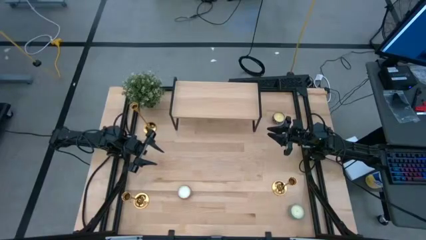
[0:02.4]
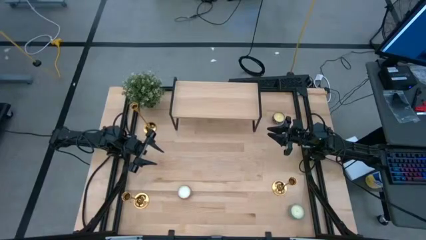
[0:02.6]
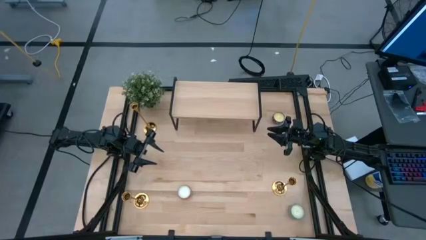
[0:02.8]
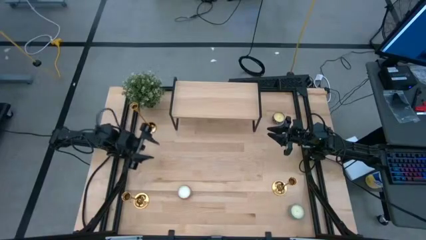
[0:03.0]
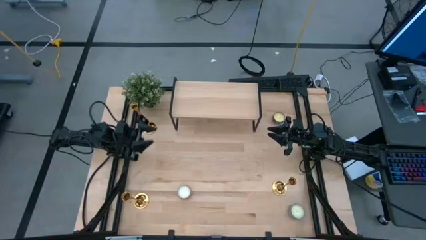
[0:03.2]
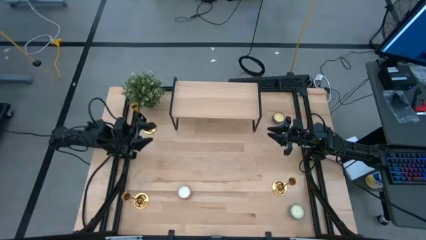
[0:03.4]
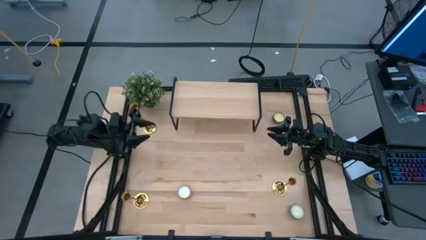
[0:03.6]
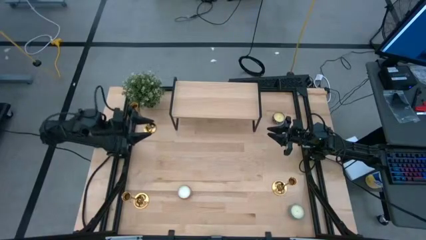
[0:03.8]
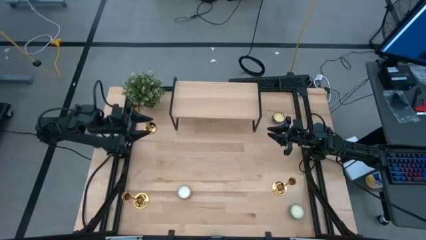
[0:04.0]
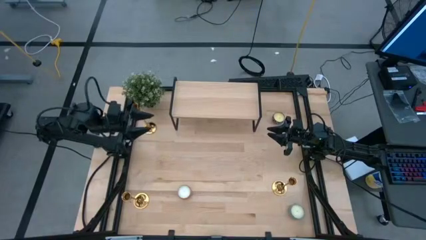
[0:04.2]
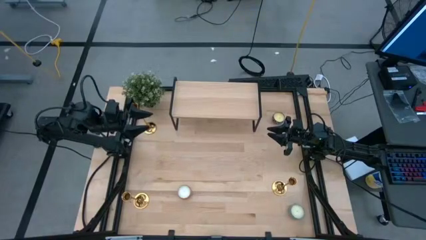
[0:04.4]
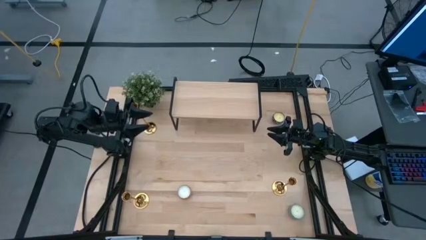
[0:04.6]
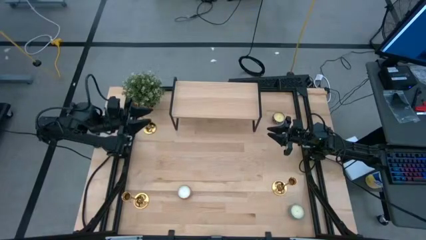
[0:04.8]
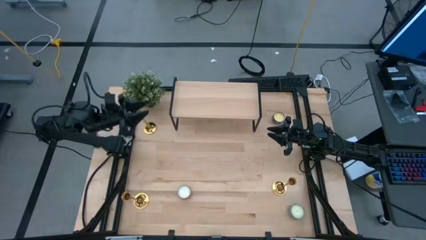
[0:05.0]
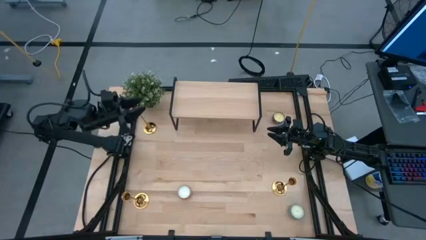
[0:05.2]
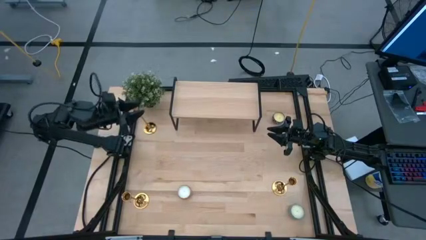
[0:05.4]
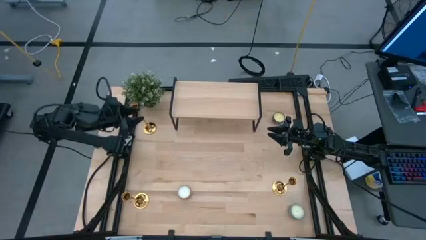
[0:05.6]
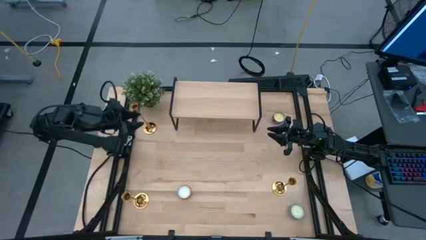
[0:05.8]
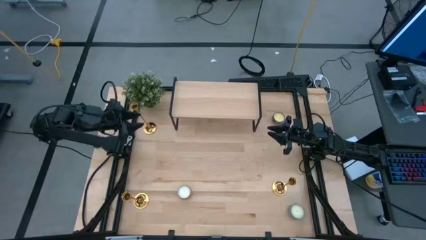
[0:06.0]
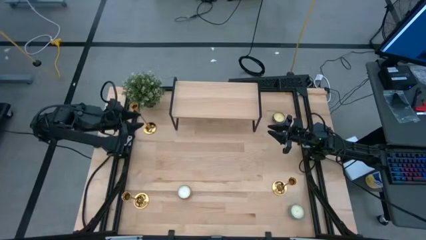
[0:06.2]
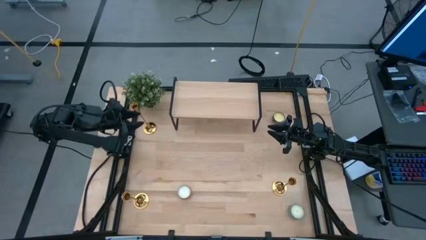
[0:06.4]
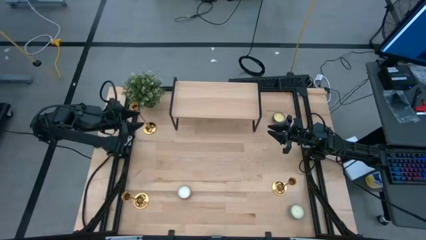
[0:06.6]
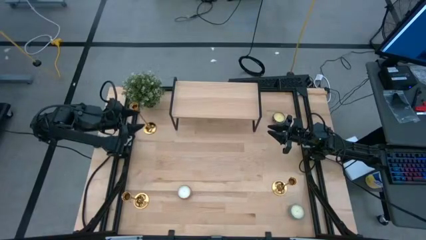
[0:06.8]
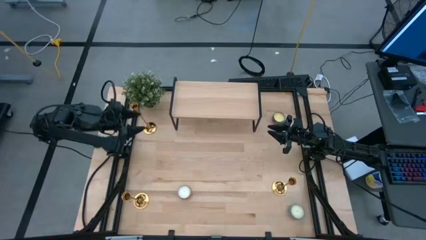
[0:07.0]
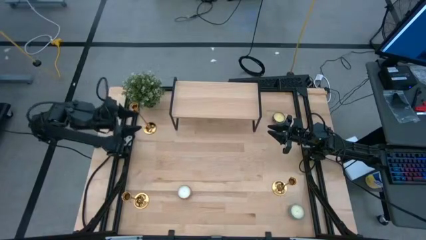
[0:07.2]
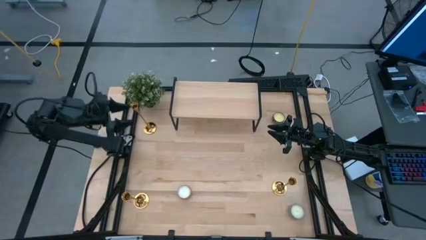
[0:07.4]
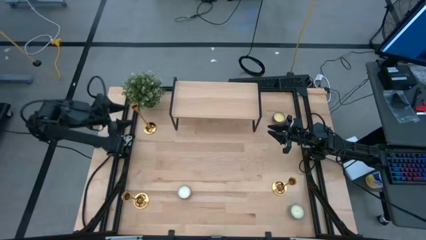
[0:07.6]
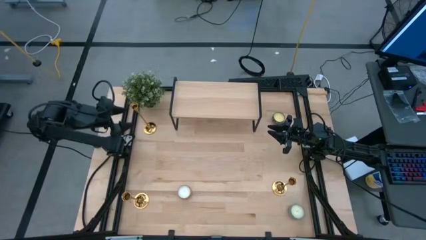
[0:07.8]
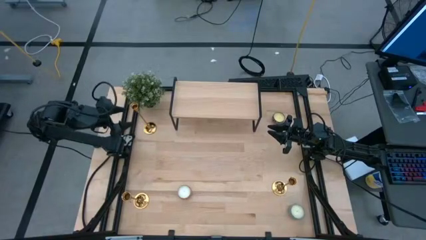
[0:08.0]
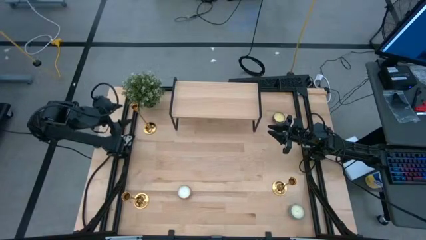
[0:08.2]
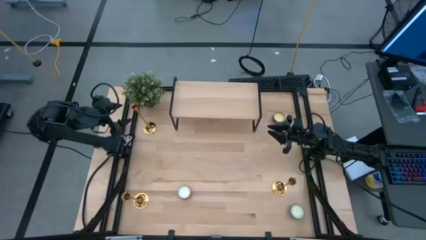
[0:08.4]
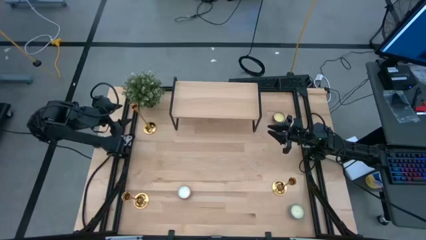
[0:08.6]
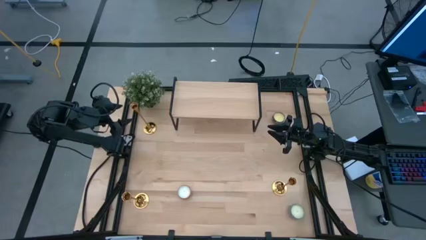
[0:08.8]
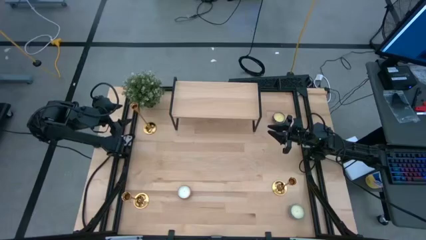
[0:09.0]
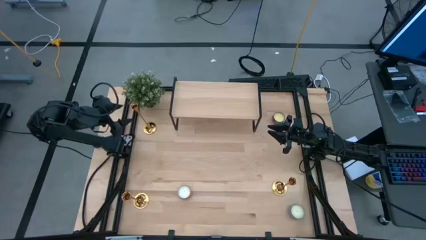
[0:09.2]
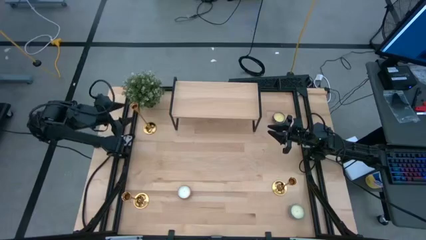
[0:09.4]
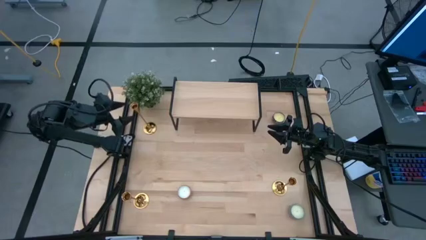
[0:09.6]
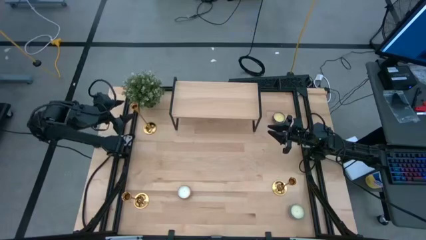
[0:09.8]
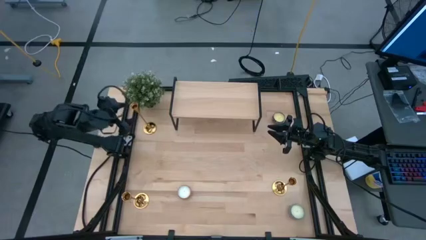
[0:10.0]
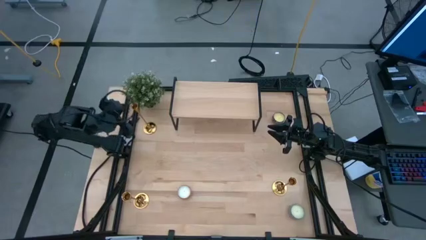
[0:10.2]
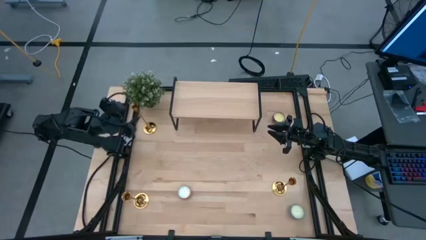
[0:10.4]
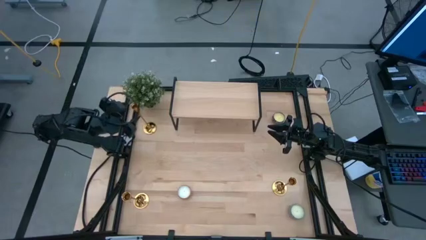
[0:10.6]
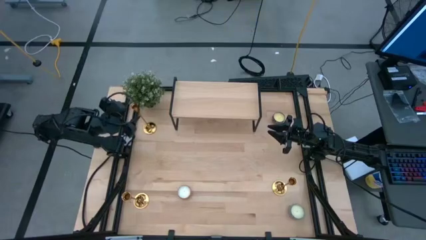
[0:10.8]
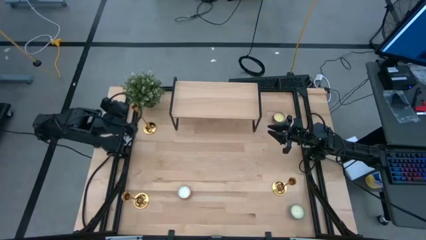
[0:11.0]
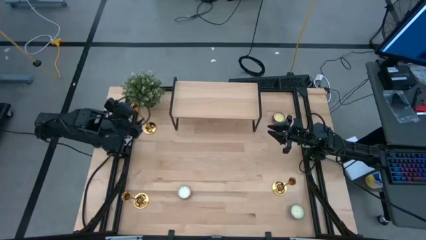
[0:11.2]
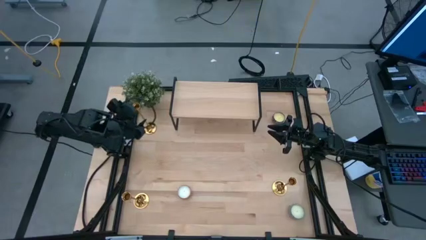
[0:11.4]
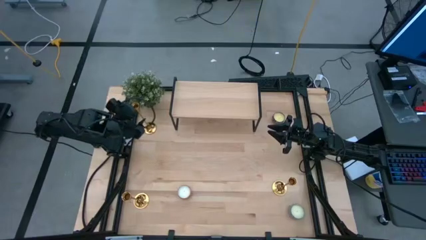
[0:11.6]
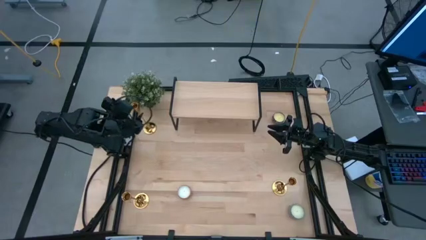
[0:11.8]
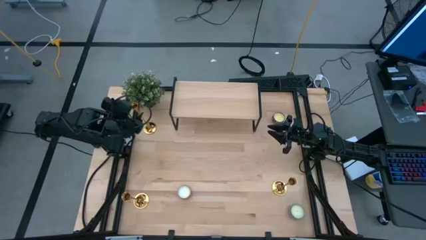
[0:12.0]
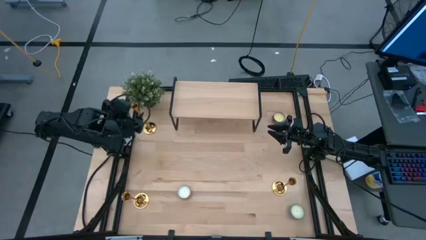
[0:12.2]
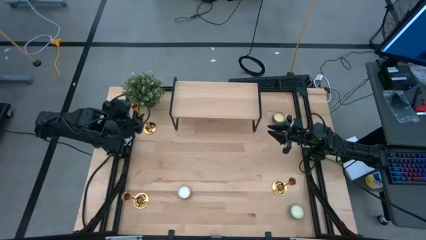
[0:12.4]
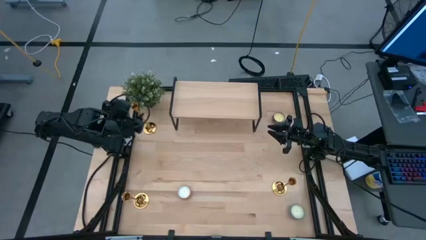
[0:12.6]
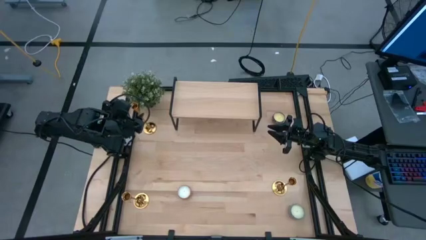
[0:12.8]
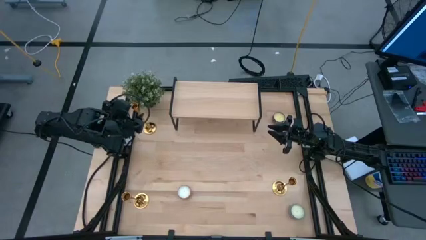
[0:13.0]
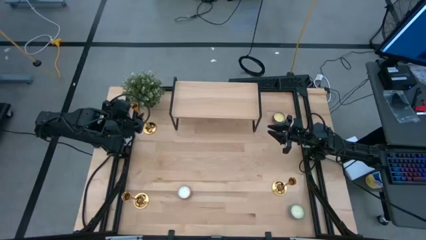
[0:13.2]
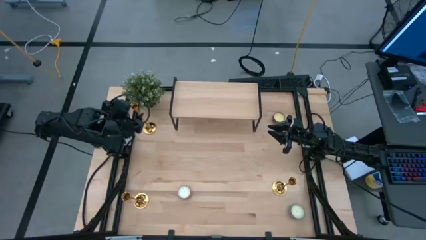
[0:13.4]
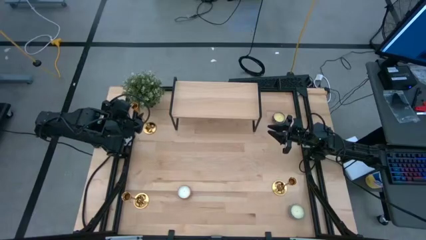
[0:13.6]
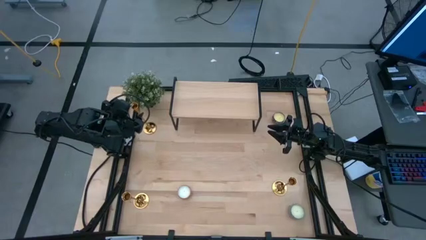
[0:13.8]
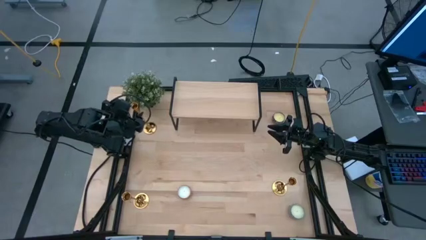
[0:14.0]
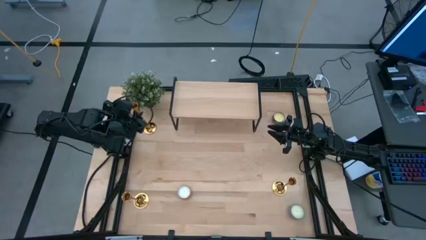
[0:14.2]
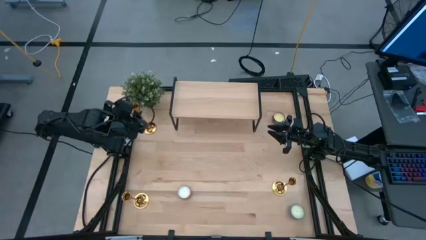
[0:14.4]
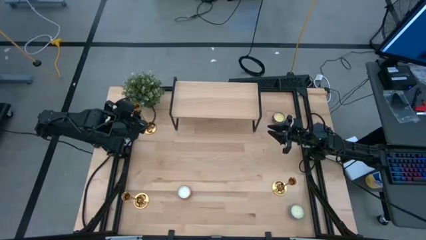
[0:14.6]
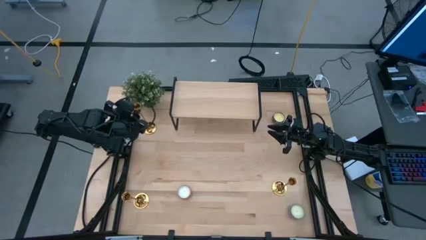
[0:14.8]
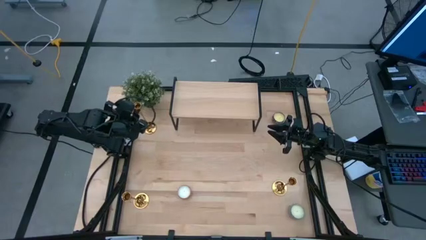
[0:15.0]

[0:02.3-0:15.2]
Task: Pick & Place candle stick holders
Put the top left gold candle holder on the shelf

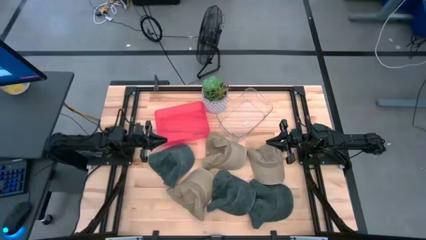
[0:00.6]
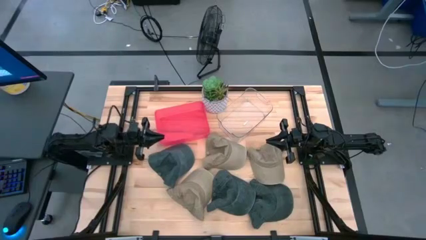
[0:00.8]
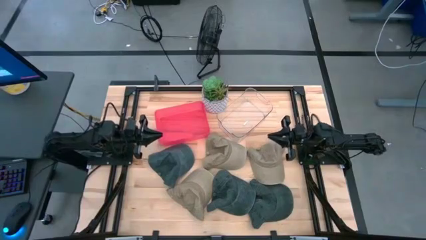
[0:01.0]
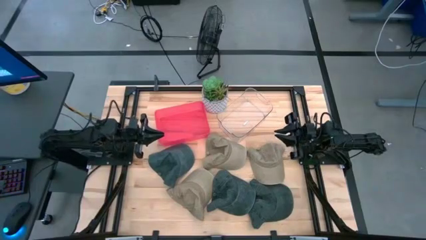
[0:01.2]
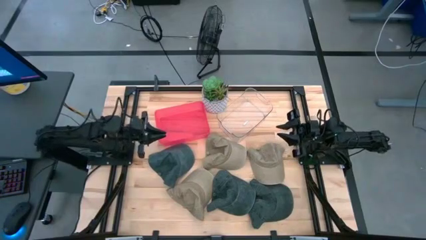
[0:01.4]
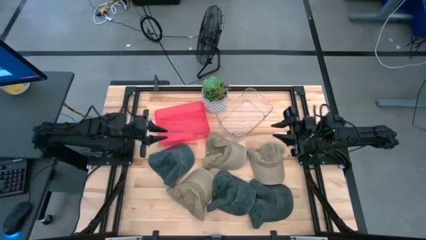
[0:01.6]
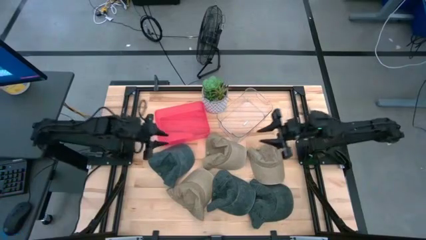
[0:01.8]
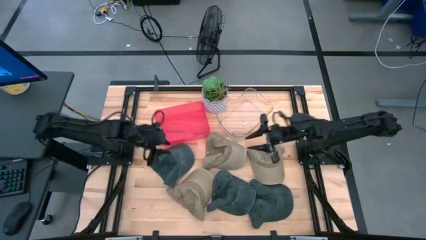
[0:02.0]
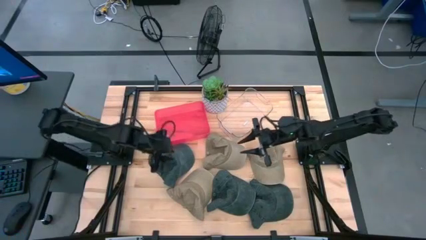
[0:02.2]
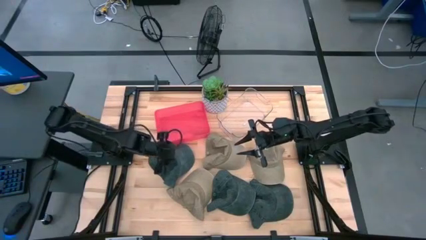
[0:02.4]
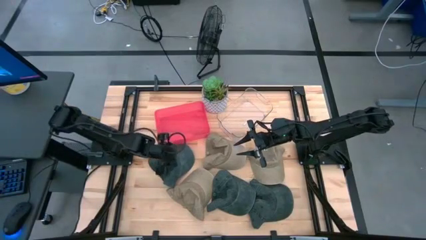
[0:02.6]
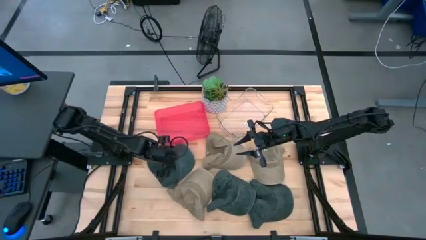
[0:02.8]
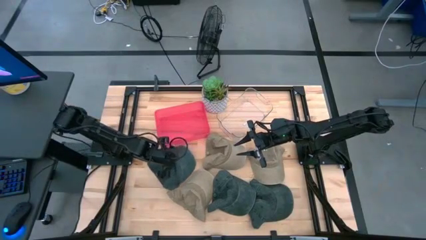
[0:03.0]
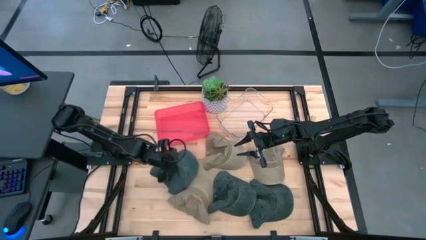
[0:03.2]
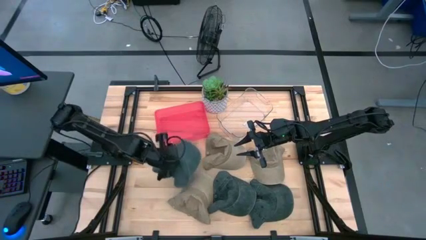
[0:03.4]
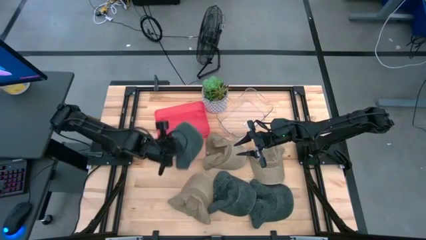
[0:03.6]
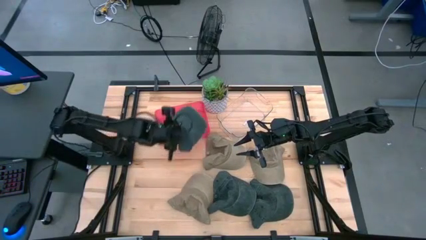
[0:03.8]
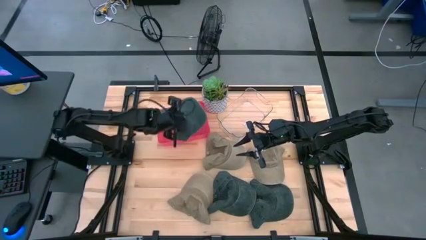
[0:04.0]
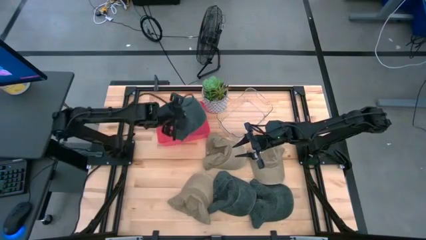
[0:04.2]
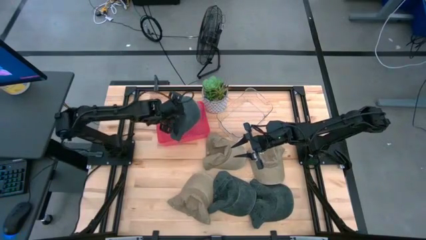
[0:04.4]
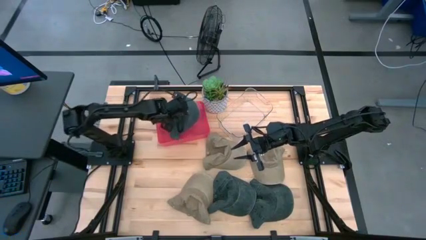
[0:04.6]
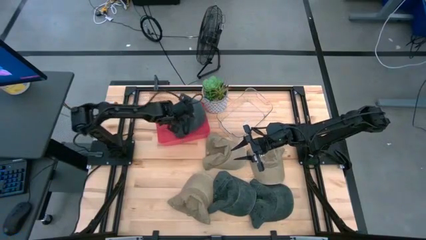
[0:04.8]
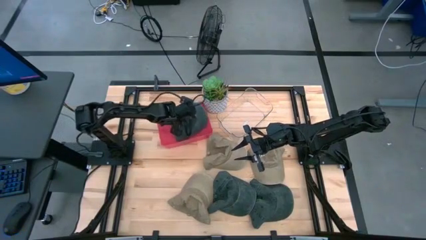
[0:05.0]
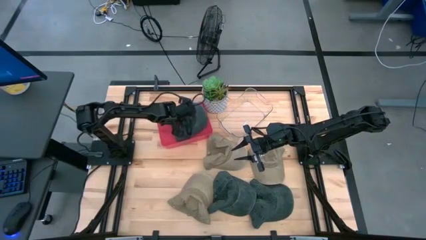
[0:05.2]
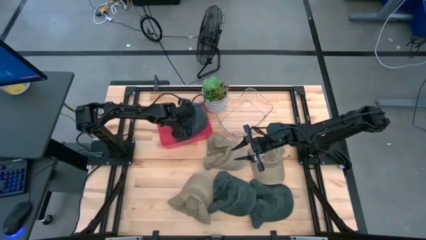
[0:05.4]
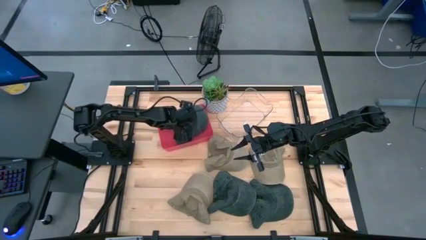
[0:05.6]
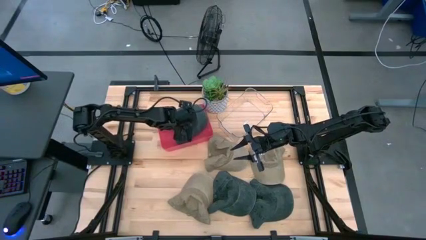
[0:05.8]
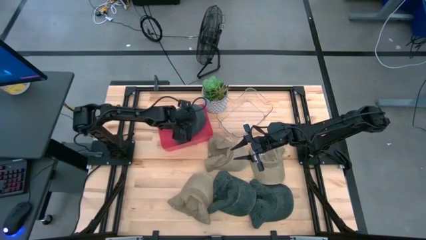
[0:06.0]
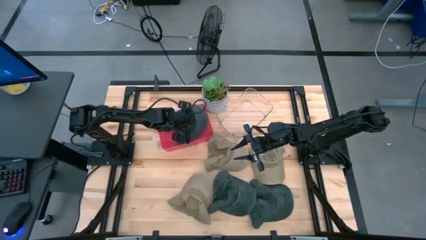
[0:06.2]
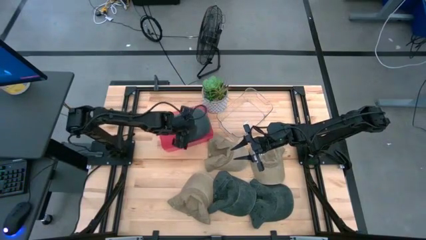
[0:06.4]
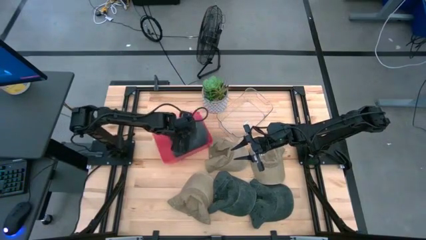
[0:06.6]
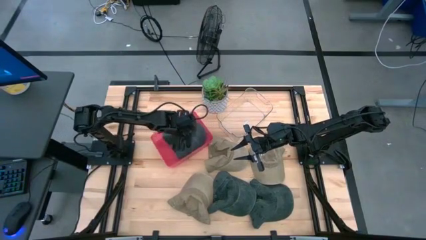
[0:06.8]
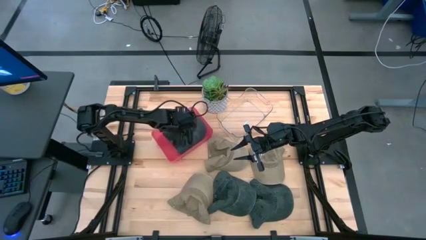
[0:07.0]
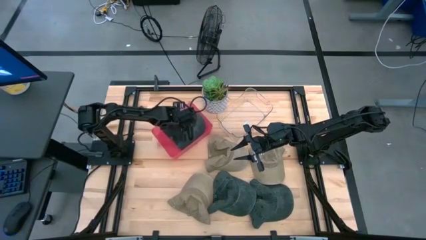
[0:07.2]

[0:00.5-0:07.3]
Task: Pick & Place hat
Put the top blue cap into the red bin
